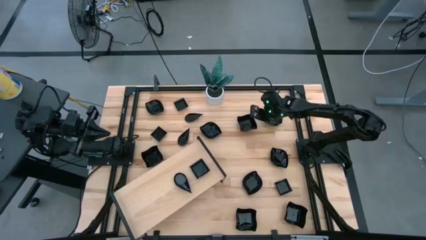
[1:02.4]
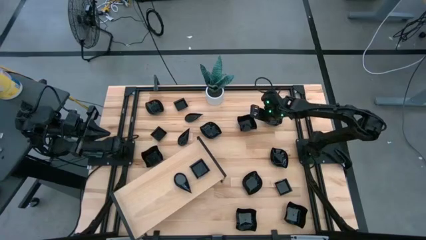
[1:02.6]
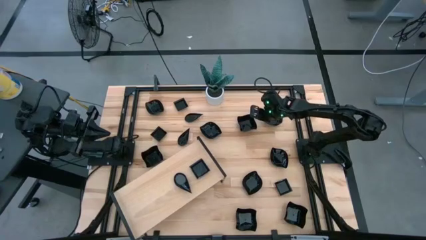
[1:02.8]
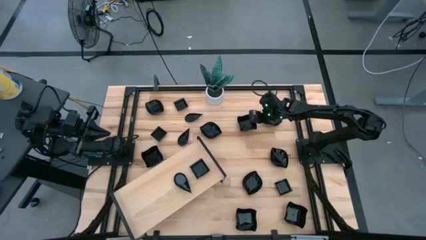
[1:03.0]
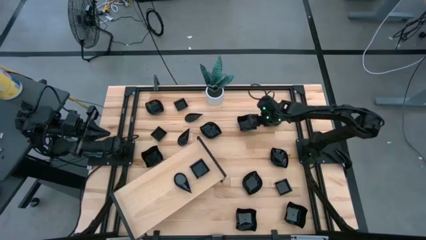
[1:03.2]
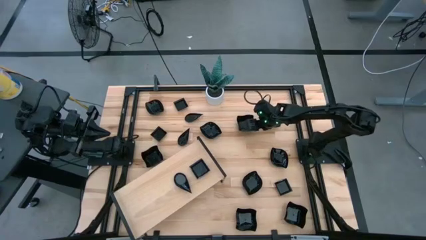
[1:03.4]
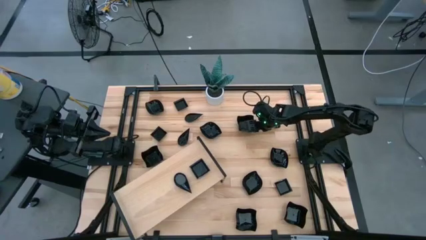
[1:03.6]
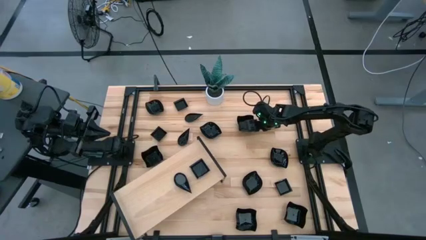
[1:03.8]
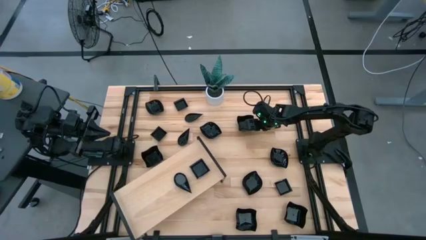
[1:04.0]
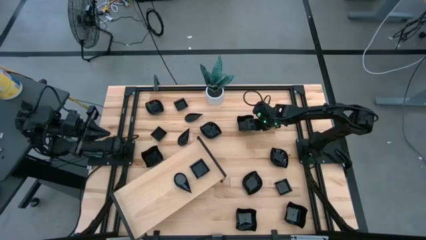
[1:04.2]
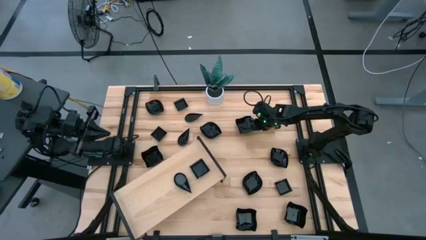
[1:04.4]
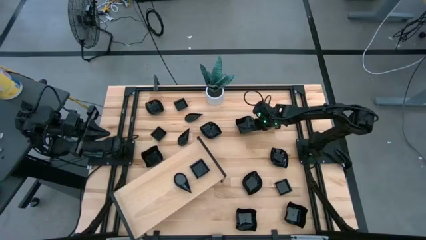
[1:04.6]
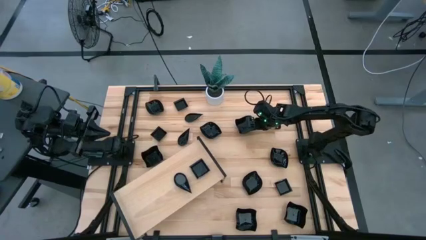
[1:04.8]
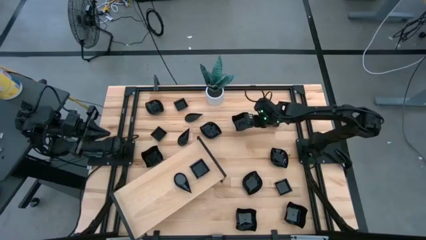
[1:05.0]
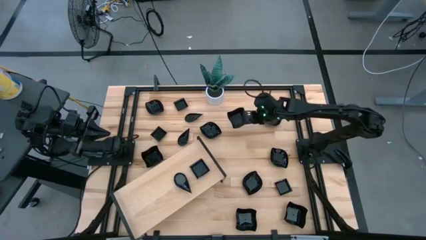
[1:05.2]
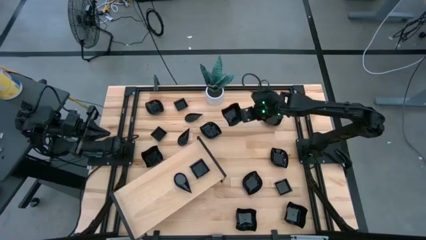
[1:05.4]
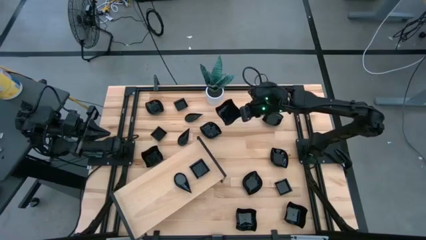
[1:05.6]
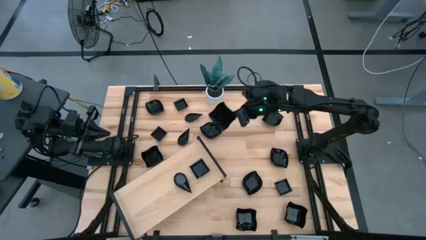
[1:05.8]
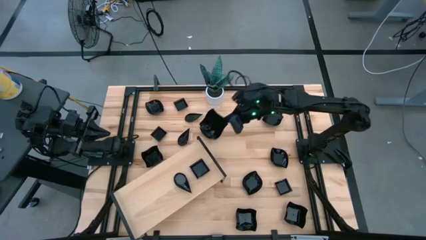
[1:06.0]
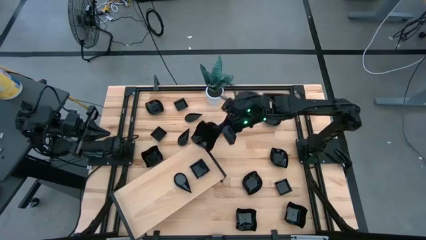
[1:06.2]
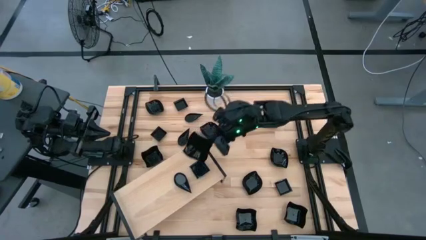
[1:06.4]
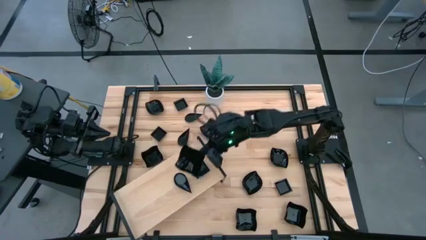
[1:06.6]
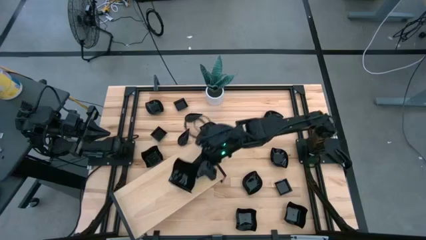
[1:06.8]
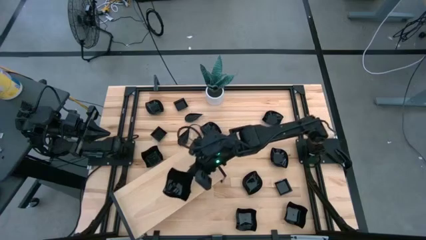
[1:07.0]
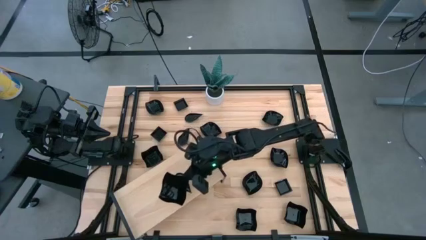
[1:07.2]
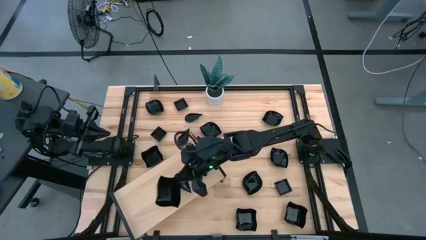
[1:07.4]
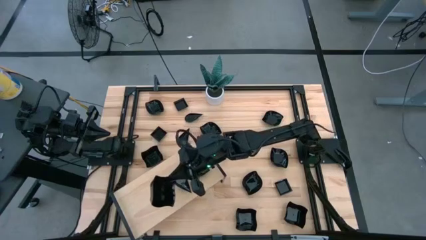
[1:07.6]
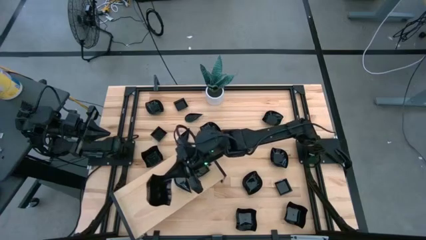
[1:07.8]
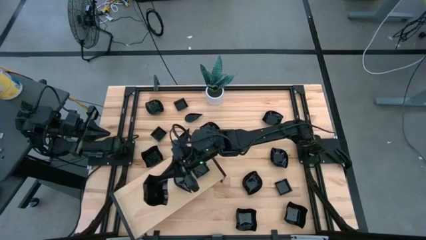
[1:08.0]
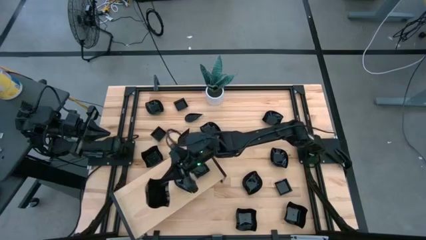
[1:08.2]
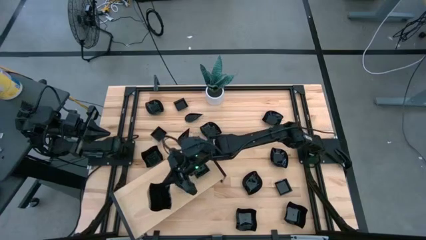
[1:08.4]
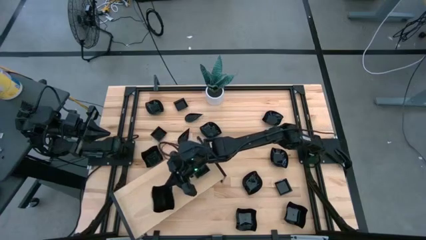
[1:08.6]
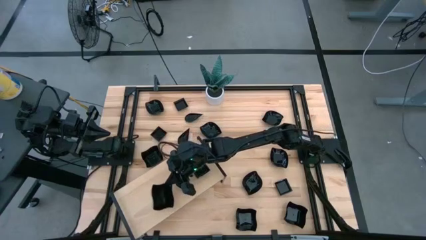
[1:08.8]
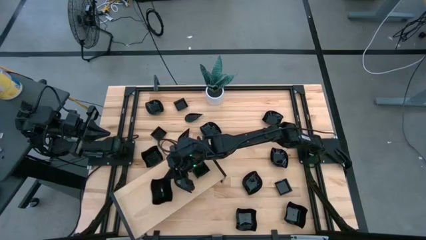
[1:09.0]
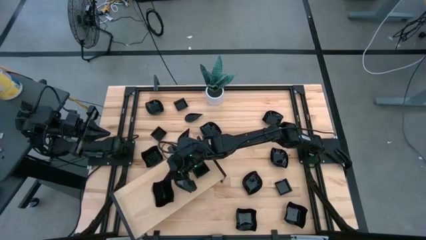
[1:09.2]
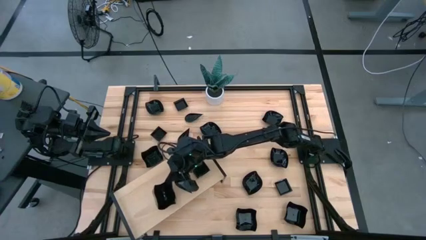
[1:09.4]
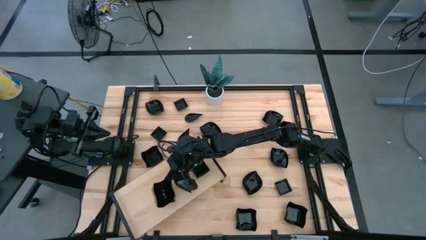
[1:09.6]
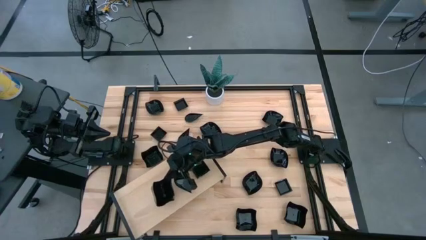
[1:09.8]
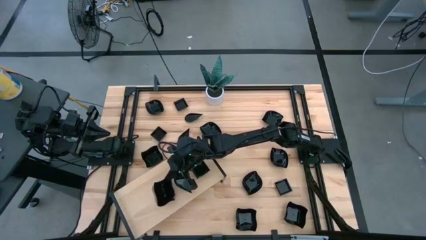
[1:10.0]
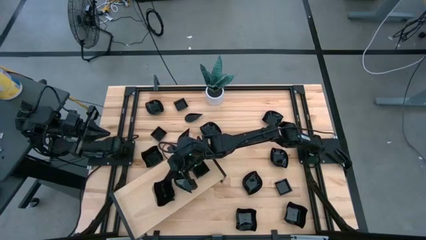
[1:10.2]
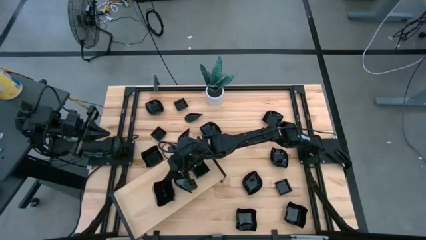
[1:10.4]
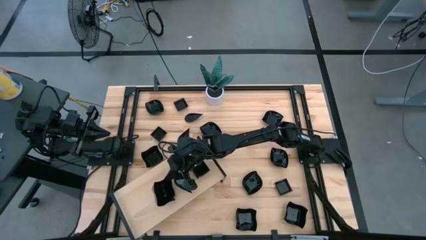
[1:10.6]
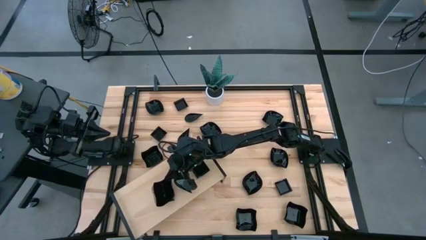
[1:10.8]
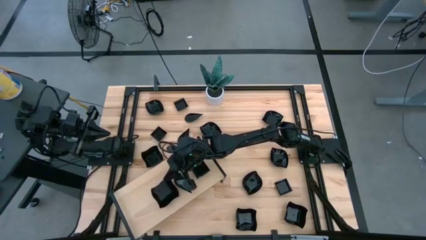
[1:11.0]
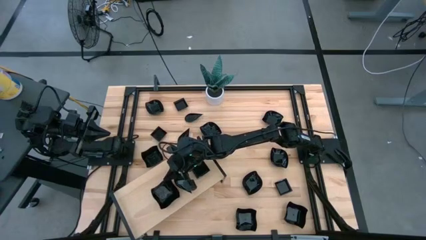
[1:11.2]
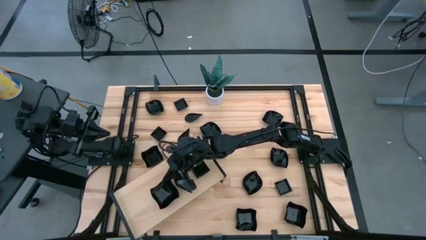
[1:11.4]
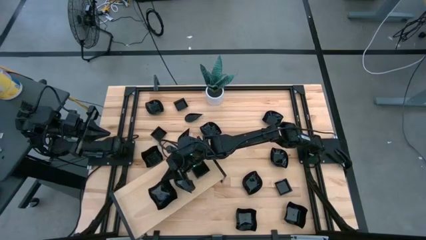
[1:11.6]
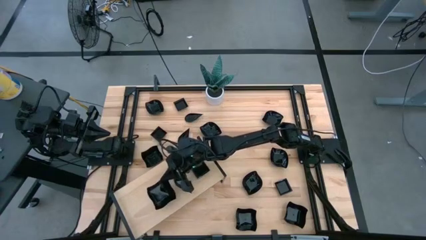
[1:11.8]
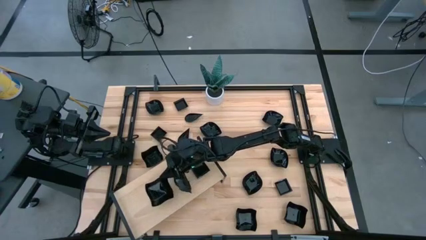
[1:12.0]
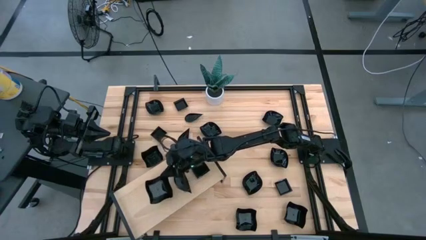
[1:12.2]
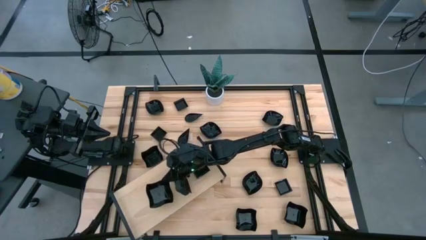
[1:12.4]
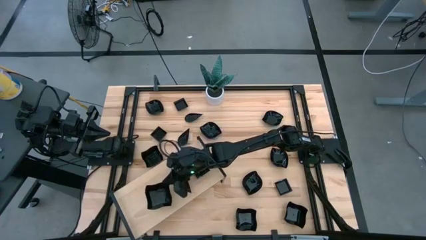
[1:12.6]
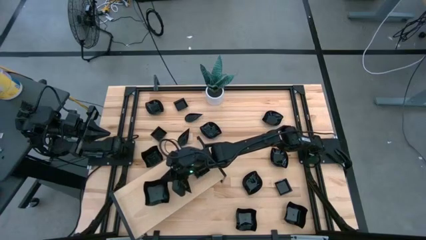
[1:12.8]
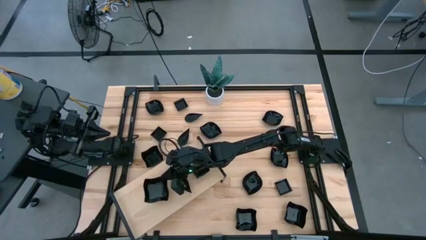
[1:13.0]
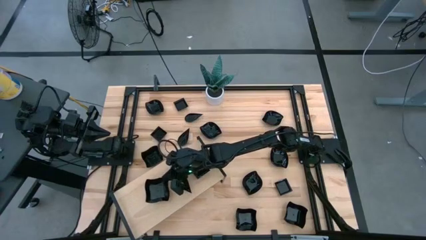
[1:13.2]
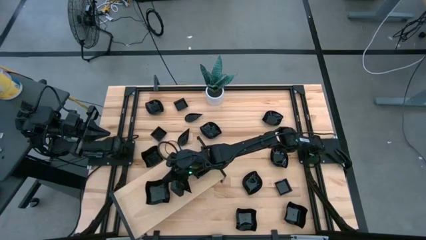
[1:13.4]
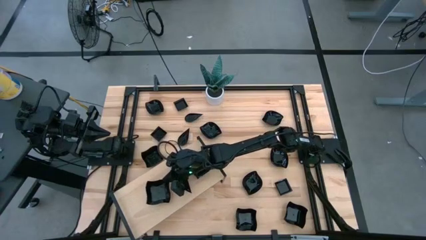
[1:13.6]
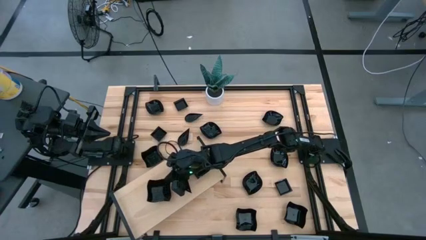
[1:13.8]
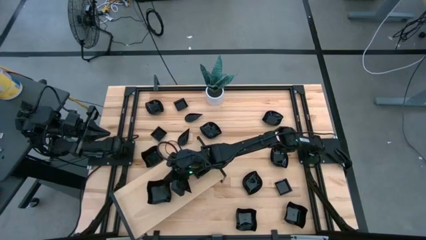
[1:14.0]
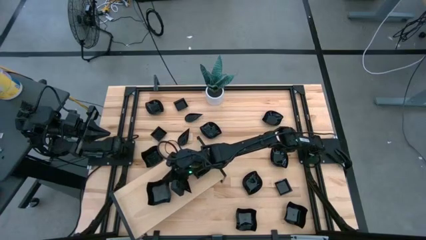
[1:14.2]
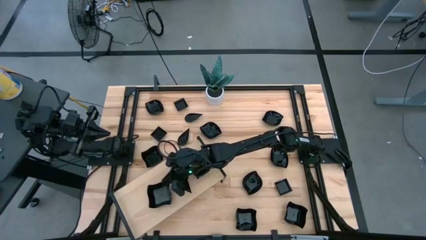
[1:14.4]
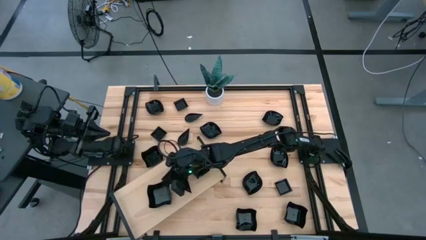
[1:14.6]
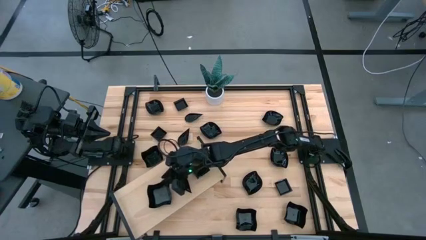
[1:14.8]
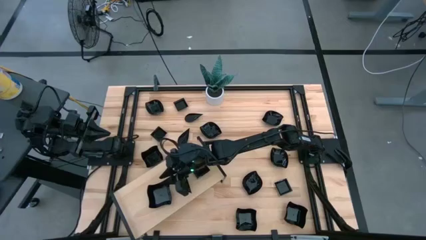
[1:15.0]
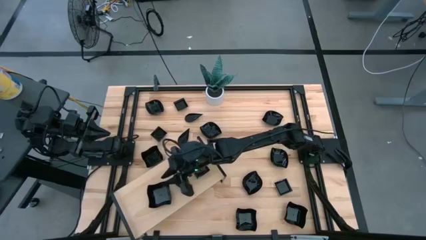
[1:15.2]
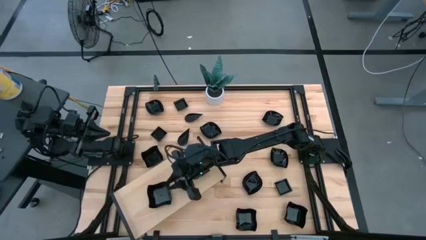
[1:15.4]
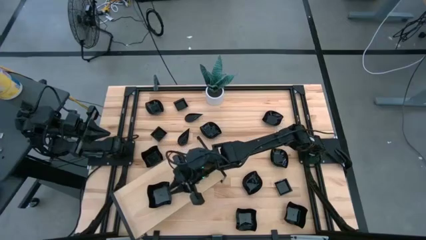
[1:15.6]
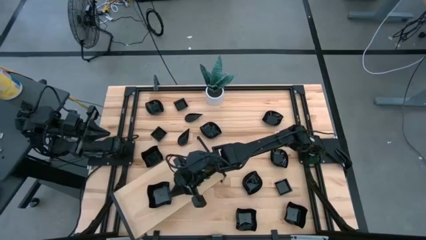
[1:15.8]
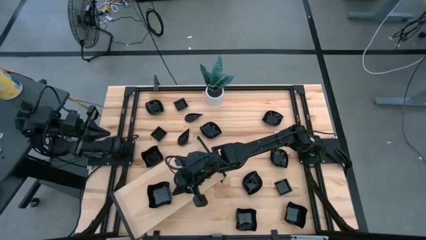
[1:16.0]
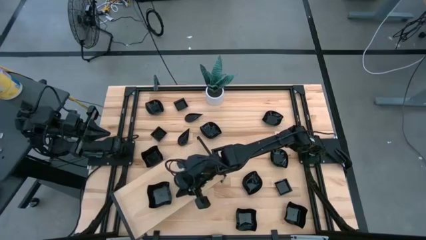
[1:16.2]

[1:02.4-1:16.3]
Task: Pick & Place Mini shaped plates
Put the black distorted square plate on the shelf

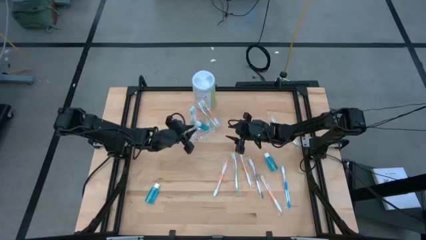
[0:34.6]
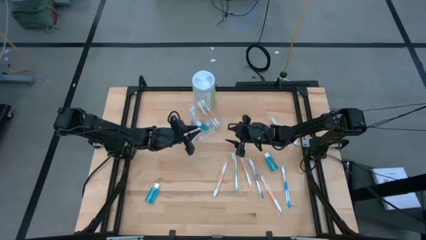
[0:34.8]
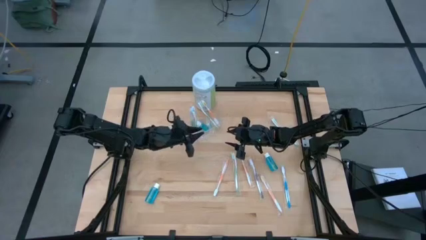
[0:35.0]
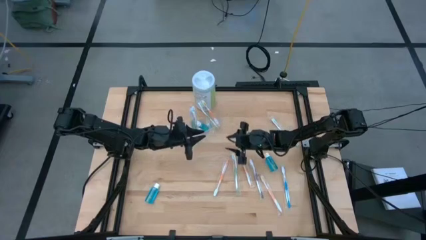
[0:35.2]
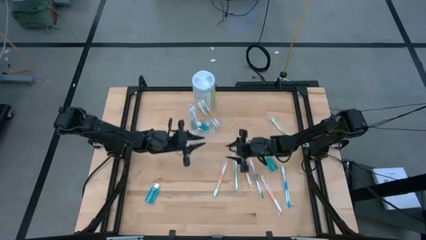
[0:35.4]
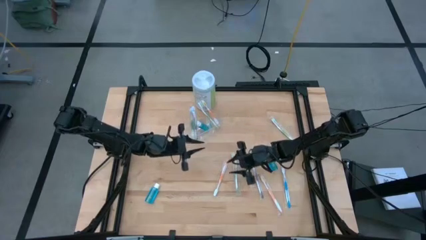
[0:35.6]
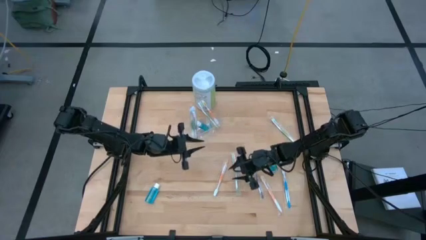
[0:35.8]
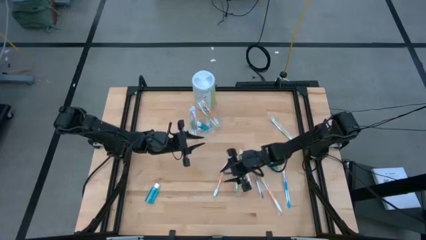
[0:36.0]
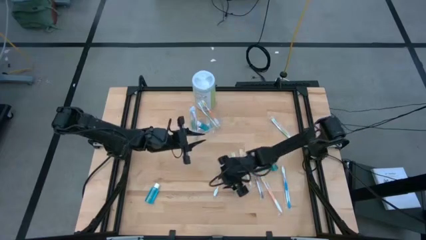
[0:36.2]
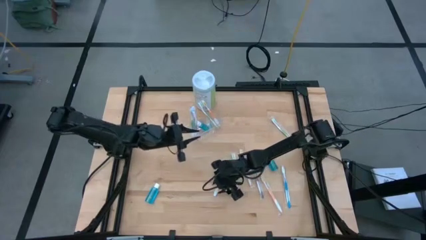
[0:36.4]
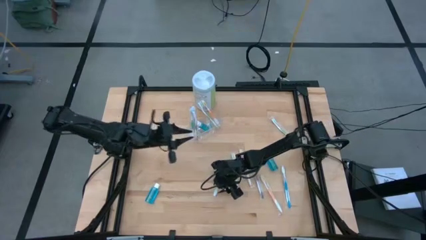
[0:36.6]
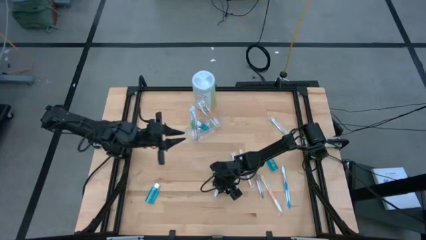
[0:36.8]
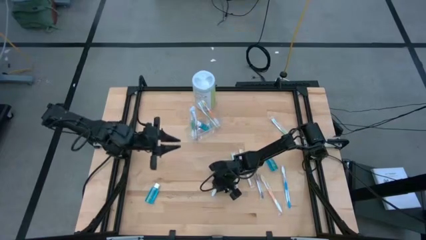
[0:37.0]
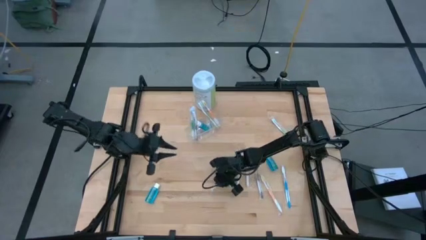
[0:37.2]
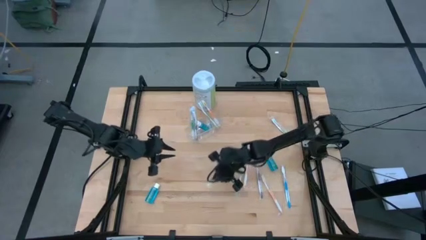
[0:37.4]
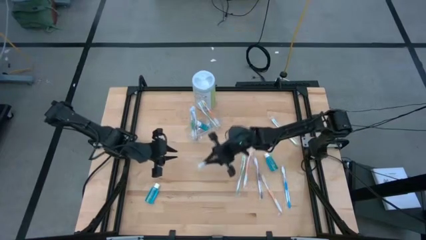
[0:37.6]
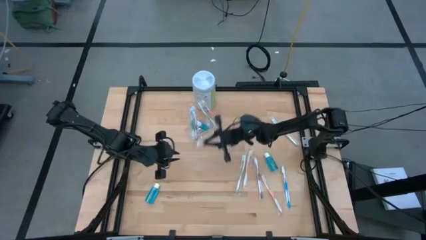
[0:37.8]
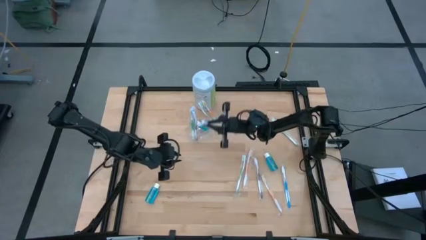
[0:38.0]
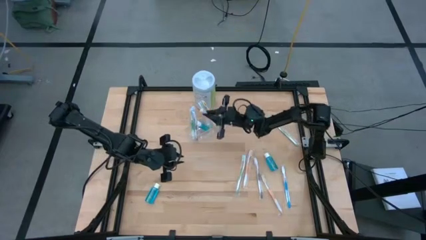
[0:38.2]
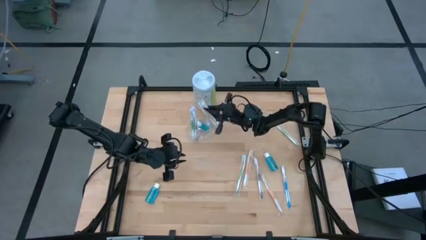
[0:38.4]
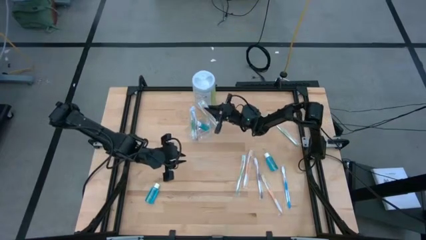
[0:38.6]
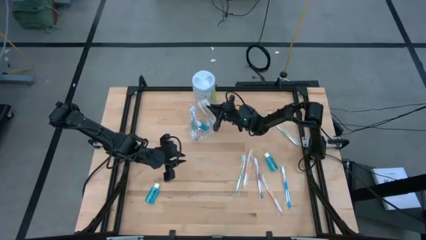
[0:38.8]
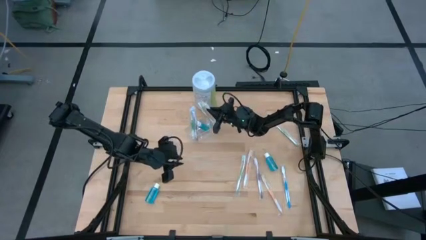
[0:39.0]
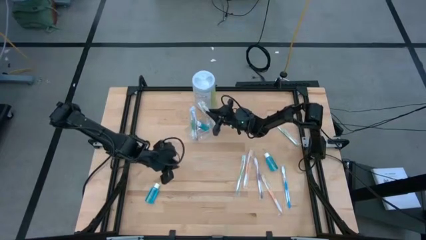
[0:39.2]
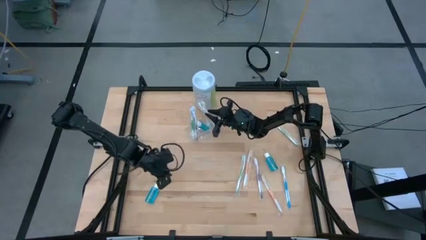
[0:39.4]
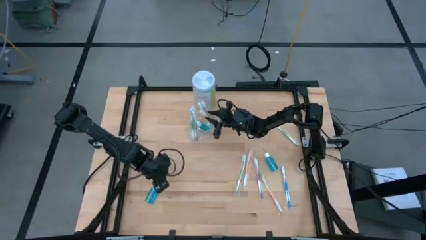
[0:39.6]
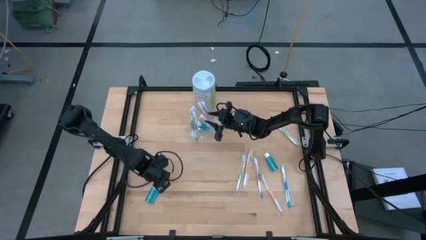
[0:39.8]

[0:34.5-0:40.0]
Task: Pick & Place toothbrushing station
Put the orange toothbrush into the transparent organizer
